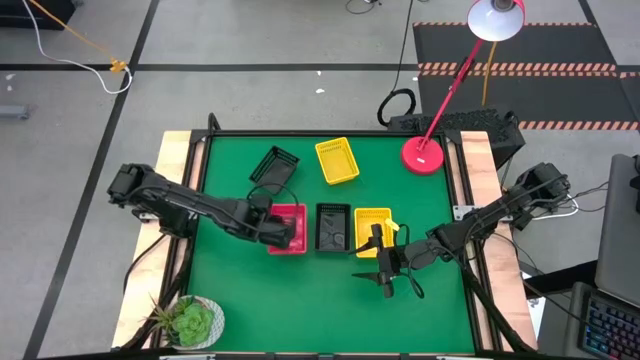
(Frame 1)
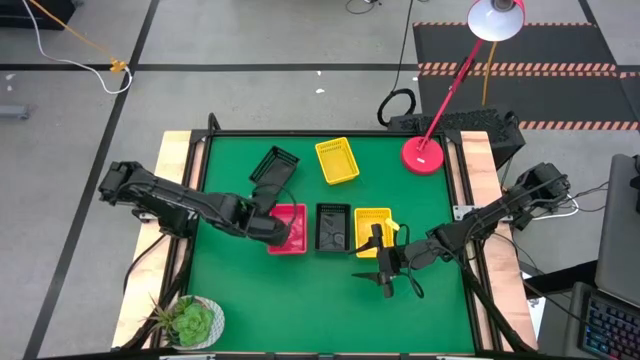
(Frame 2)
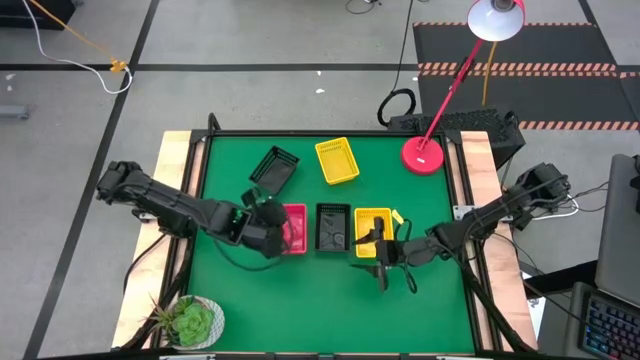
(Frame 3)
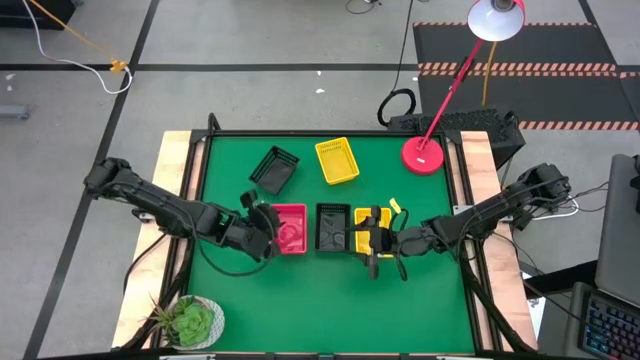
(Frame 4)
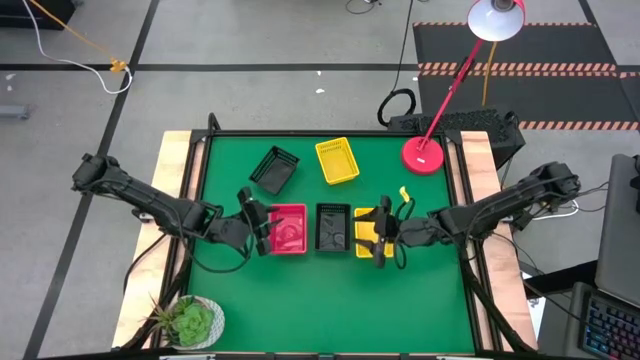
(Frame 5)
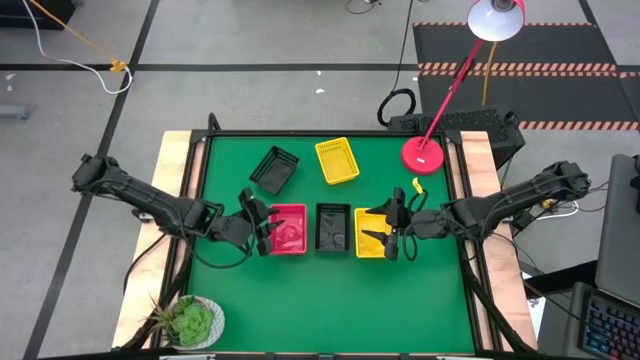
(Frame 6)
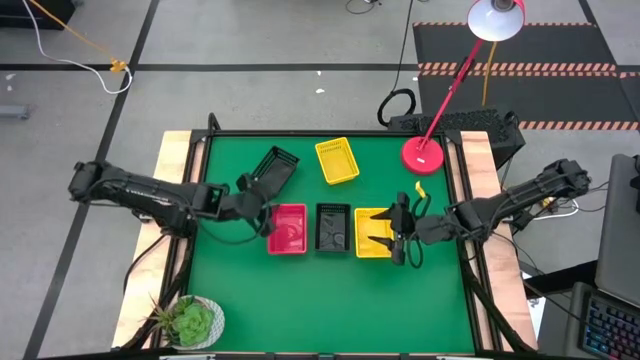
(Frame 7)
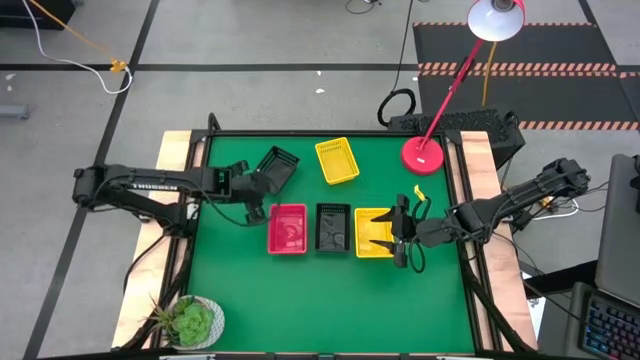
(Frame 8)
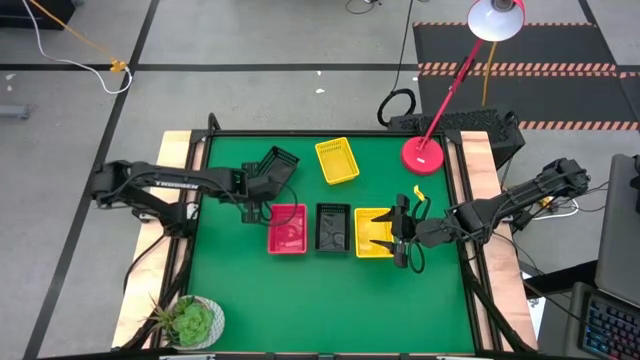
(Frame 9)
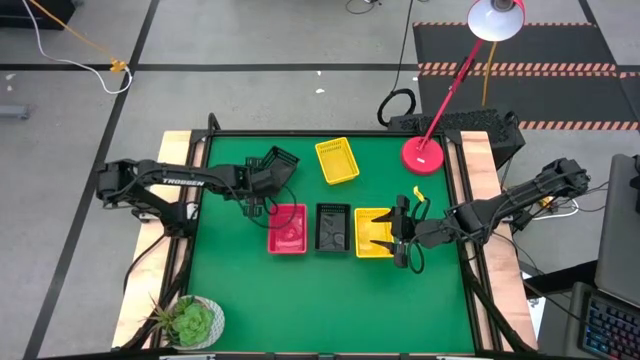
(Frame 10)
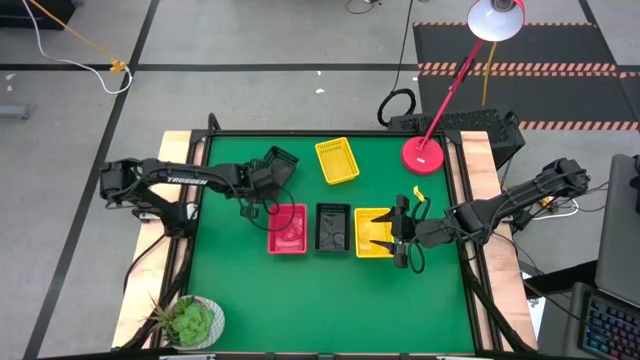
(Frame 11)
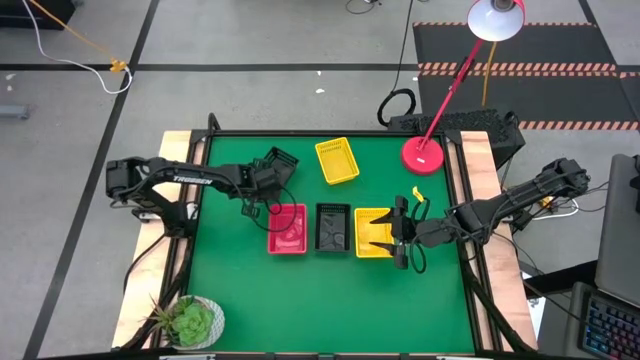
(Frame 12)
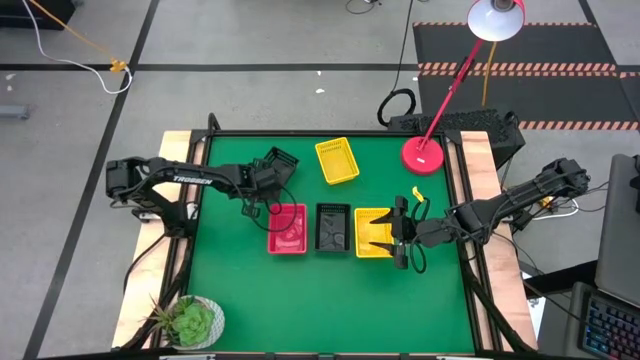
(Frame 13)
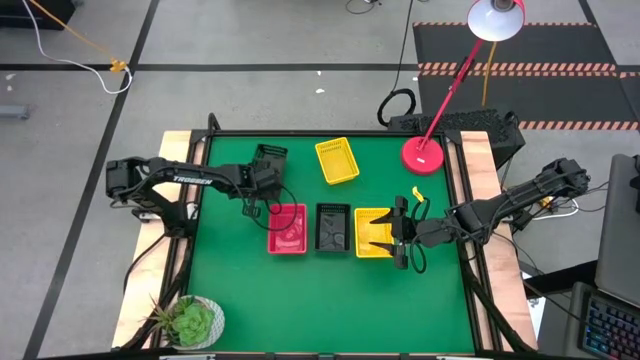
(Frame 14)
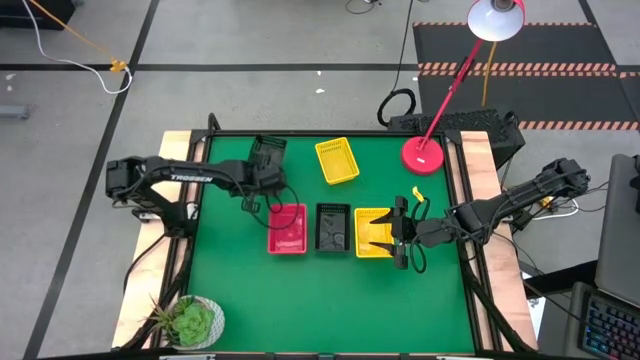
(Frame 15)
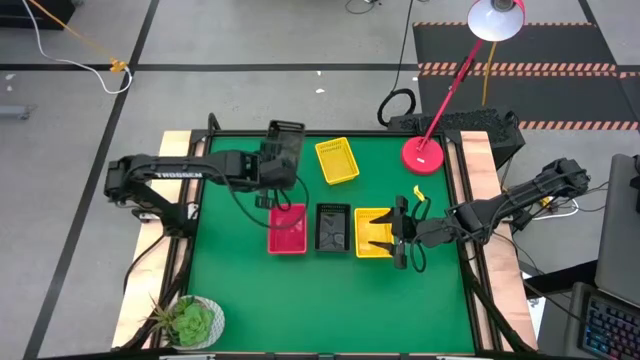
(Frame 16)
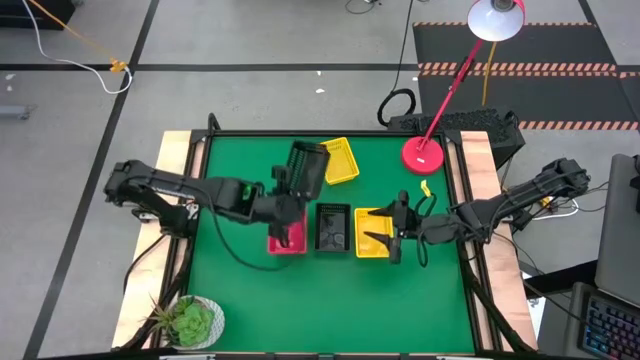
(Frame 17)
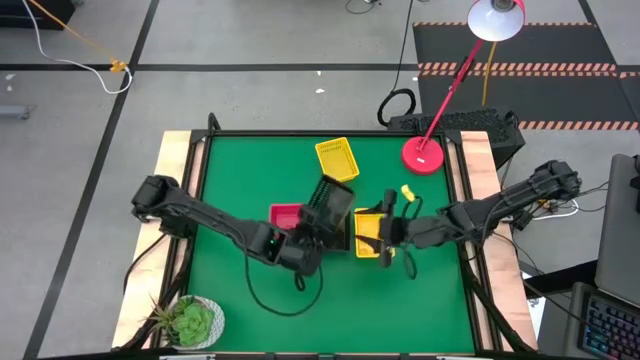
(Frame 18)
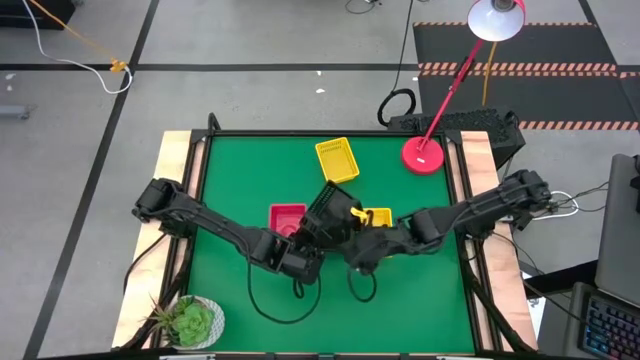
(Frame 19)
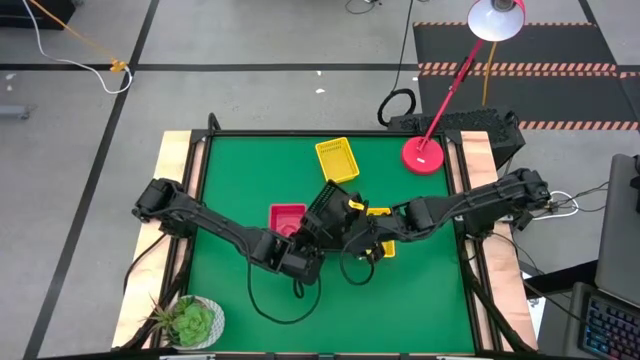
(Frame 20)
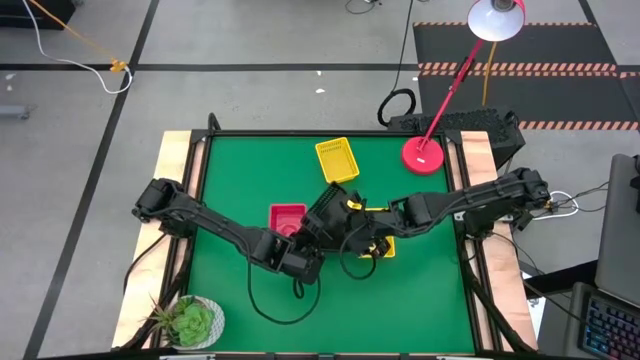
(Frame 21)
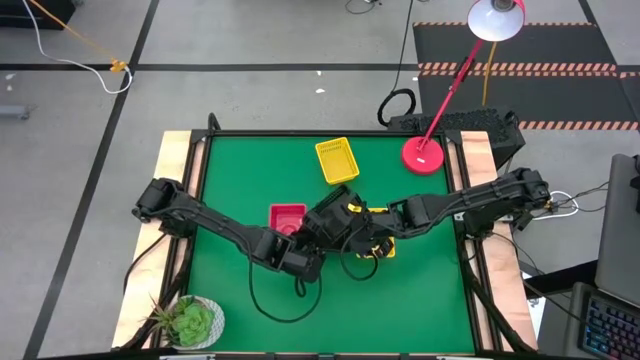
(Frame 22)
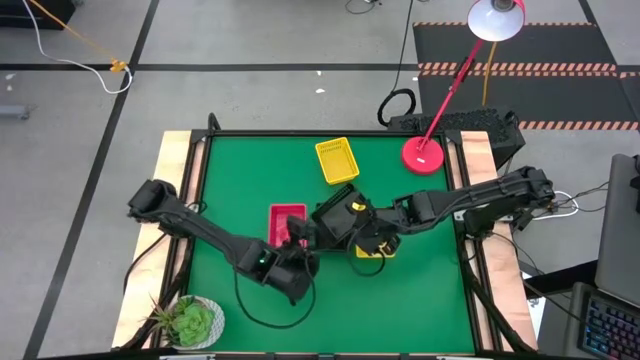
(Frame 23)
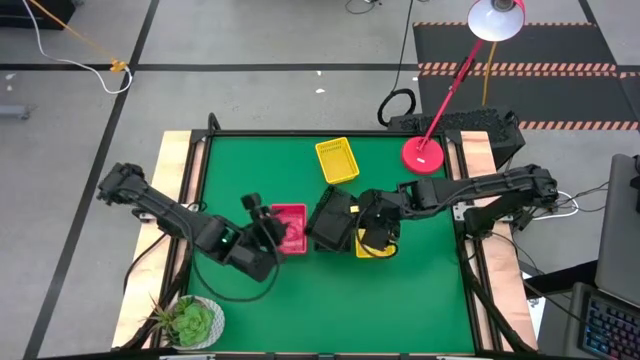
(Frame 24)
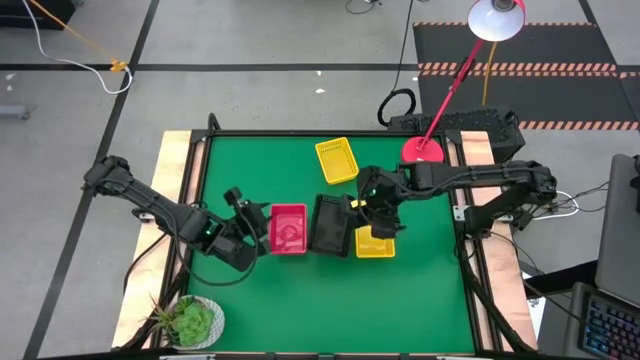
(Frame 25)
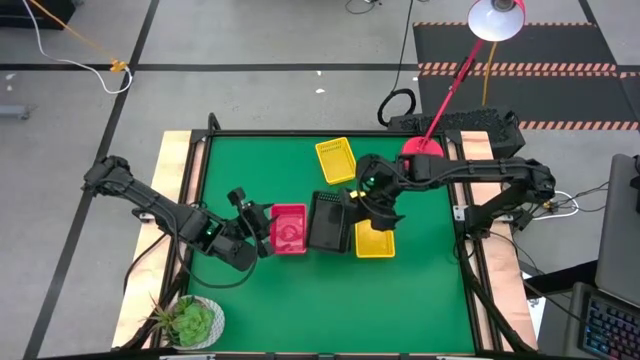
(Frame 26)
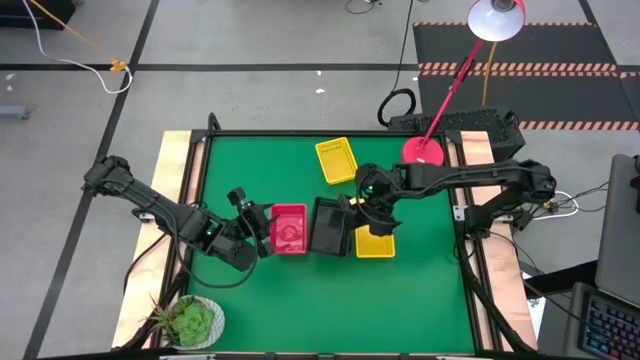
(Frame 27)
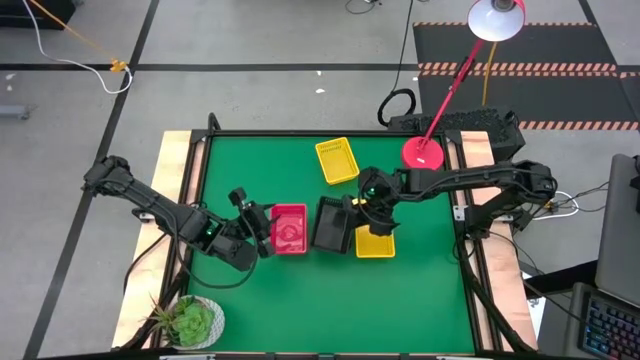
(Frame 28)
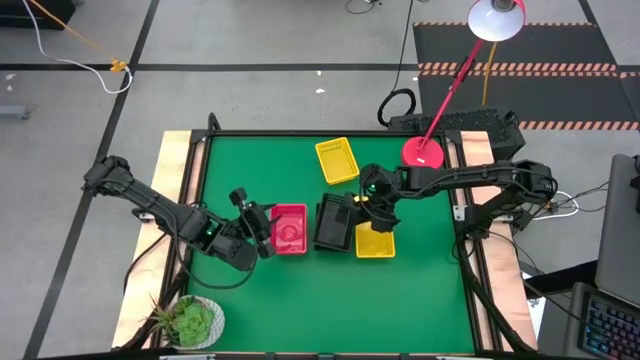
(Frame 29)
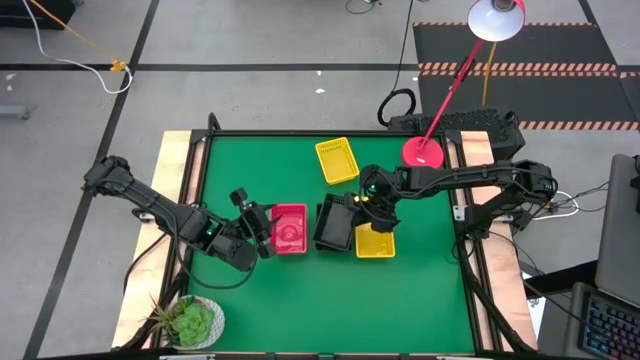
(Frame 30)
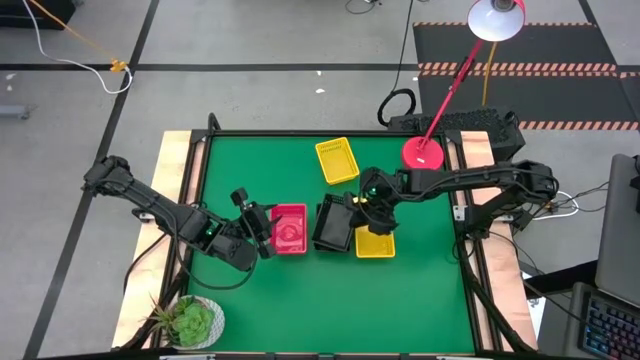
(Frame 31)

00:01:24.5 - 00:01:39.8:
Stack the top black bin on top of the bottom black bin
